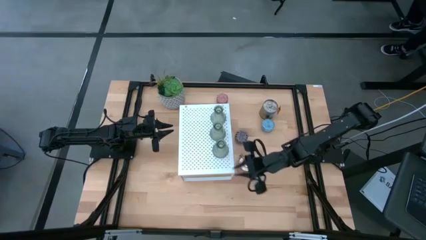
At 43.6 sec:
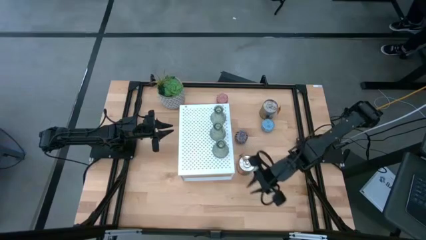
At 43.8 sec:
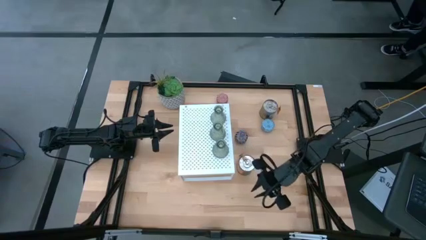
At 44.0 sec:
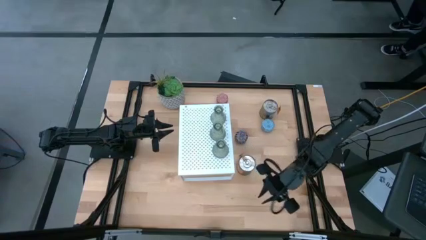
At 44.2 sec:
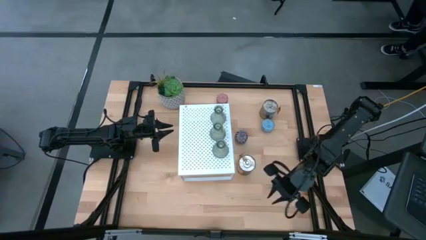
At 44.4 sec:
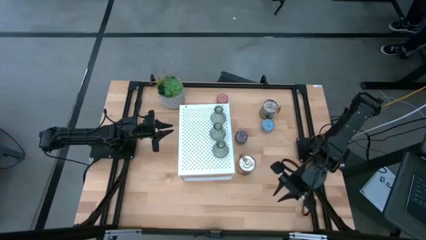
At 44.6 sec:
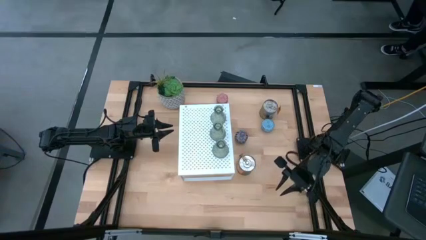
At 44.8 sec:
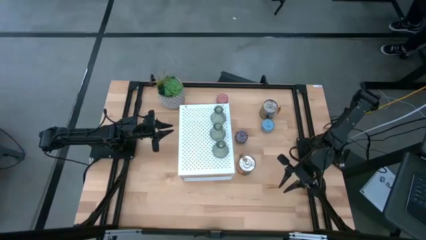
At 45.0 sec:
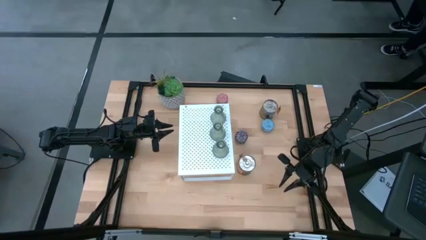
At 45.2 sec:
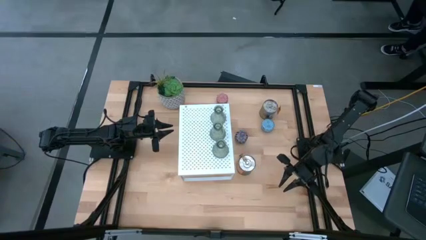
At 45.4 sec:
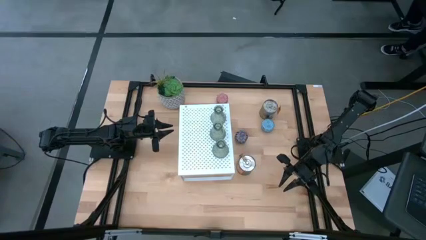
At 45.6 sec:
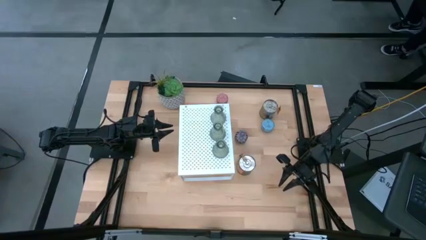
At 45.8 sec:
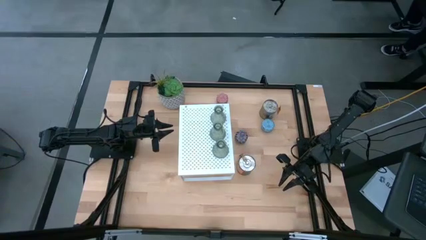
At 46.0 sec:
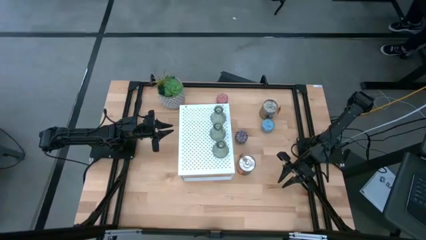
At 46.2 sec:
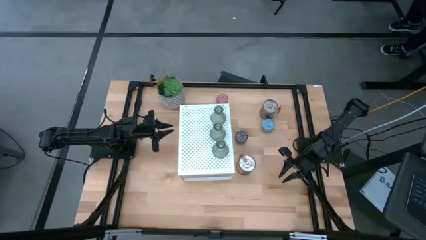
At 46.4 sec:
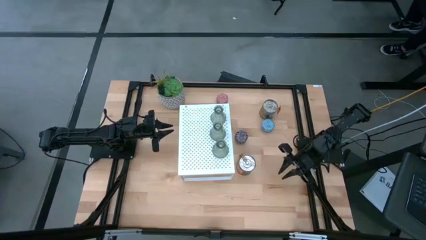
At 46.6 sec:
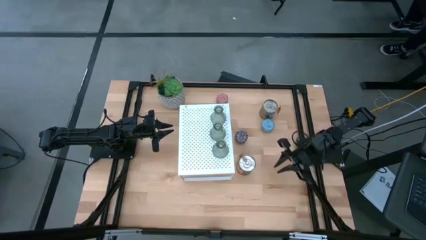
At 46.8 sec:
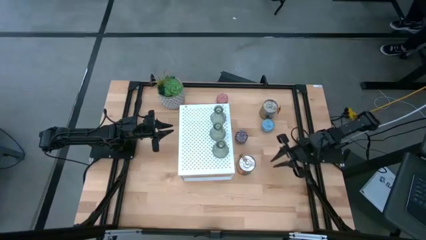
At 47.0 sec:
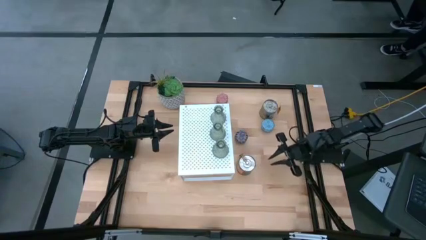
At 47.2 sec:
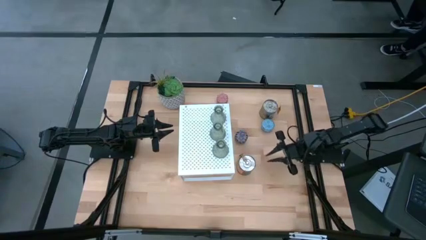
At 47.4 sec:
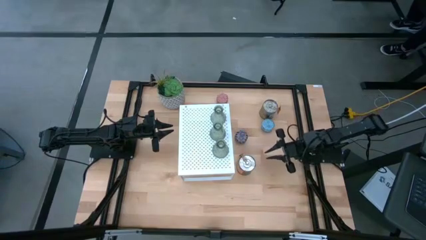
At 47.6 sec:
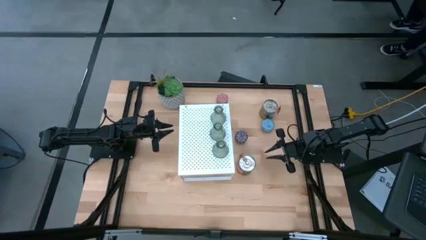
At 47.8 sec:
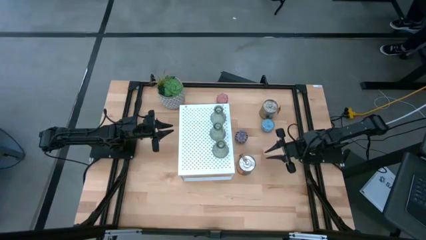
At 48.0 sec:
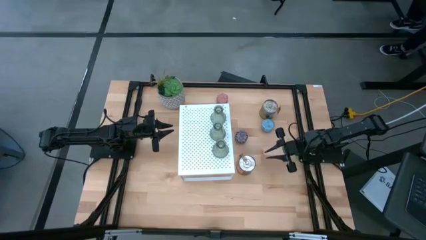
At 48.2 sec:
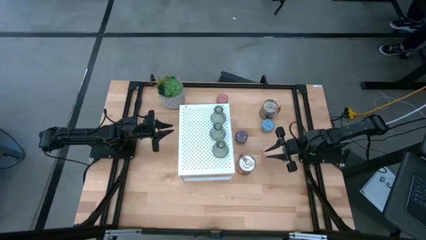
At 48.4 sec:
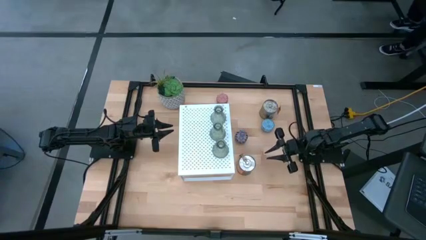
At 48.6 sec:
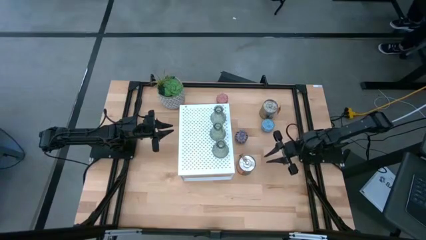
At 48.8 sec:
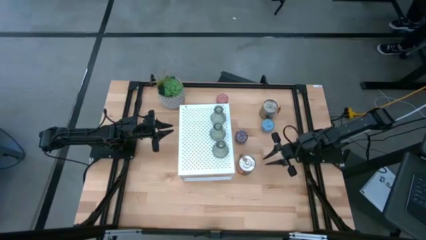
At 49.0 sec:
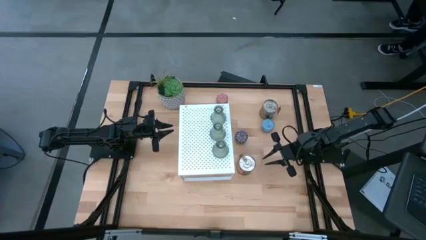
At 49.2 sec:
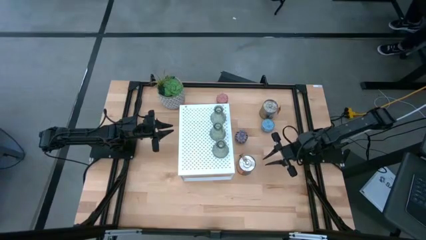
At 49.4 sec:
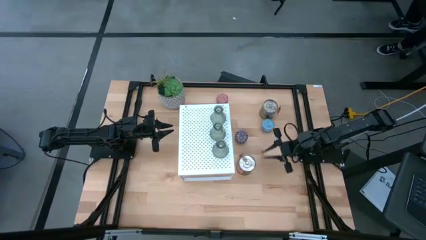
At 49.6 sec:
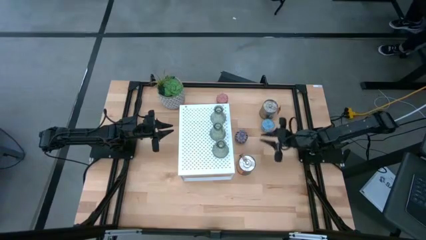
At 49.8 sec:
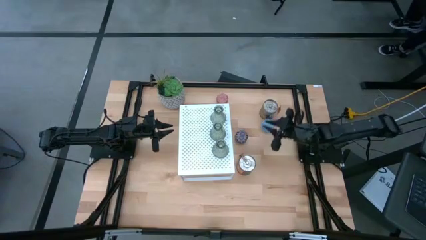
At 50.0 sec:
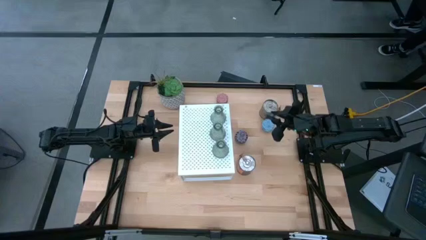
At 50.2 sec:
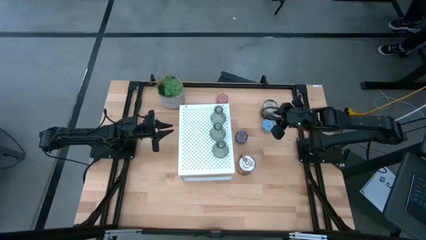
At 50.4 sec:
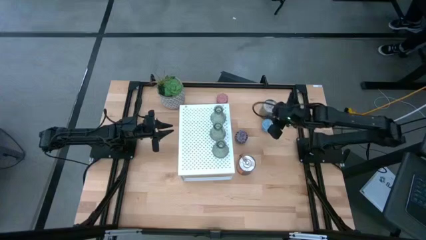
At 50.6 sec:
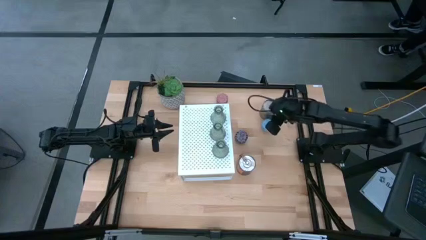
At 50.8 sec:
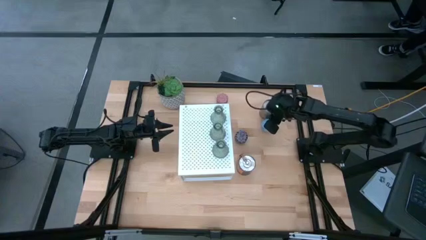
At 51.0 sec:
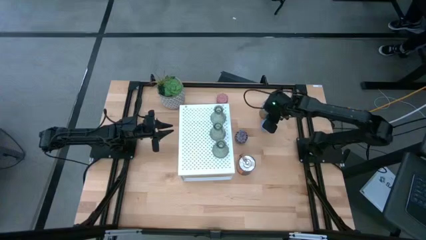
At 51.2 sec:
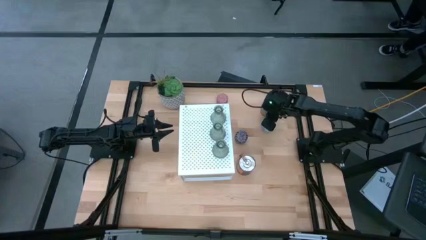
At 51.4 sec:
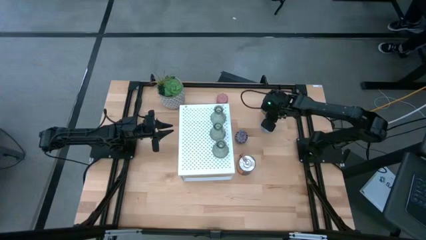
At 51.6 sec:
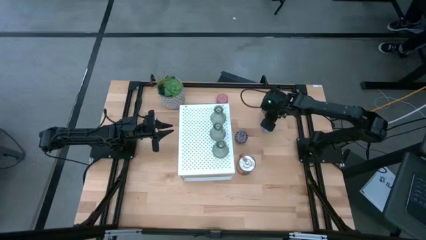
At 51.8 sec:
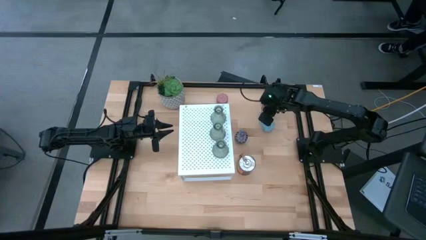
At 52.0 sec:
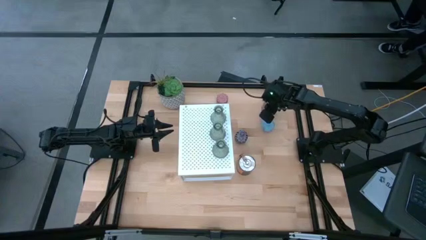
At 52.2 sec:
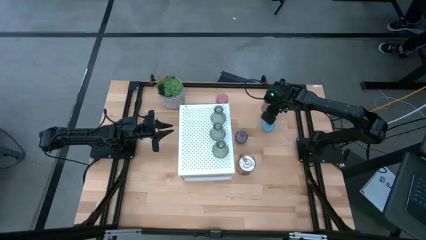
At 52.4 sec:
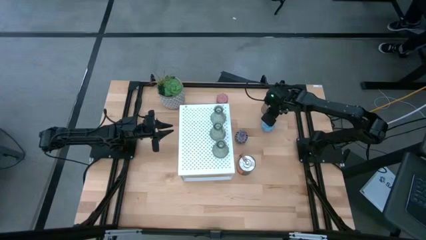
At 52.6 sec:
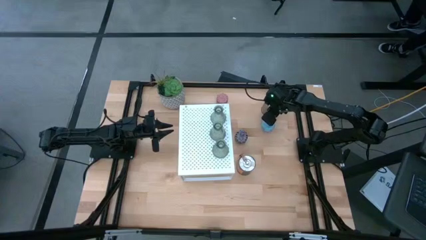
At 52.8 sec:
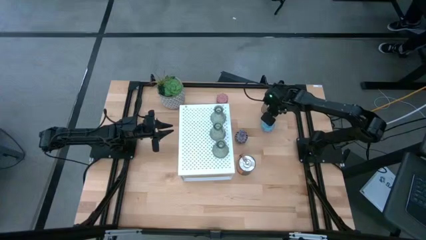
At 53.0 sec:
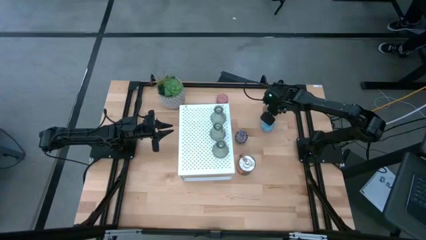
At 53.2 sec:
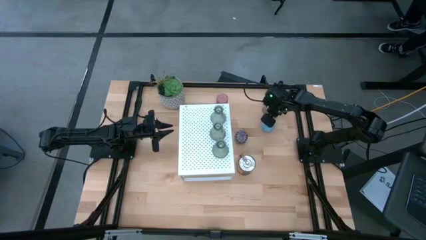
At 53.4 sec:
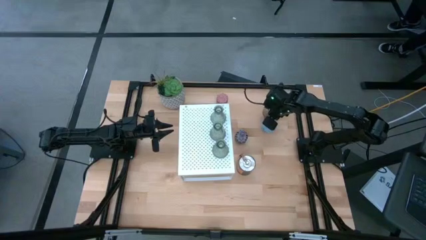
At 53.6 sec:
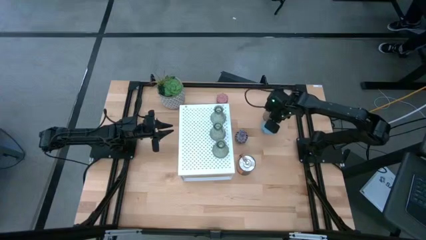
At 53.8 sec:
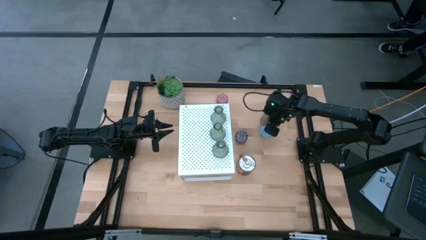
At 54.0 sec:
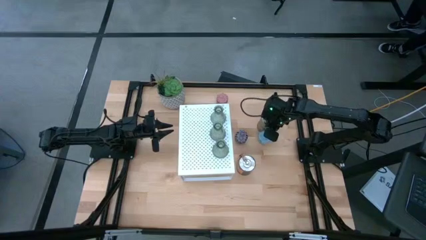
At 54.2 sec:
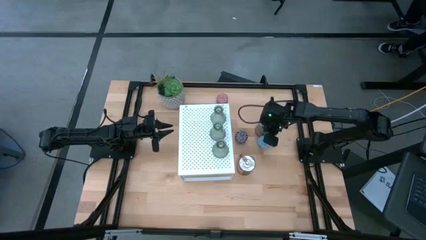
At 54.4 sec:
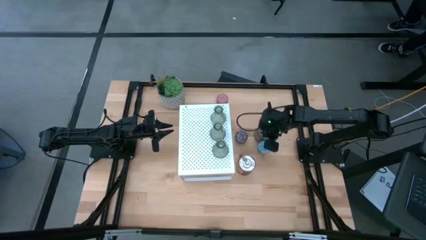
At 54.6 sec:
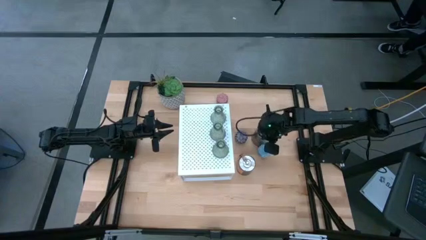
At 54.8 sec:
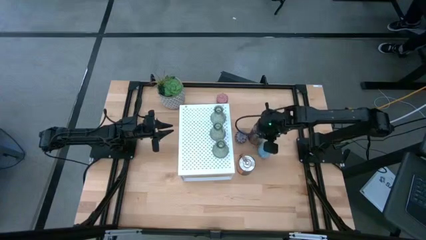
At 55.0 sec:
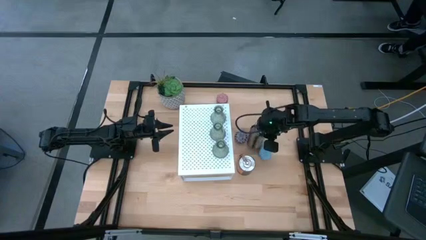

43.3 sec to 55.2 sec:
Task: Pick & Place candle stick holders
Put the top orange scented candle on the shelf

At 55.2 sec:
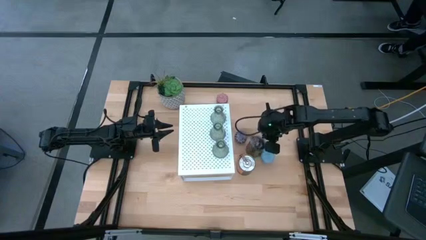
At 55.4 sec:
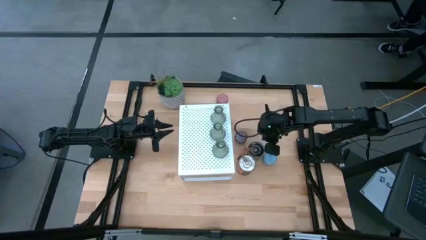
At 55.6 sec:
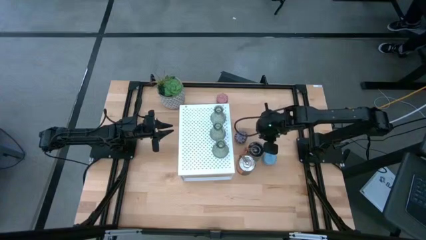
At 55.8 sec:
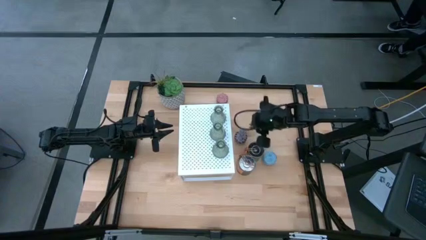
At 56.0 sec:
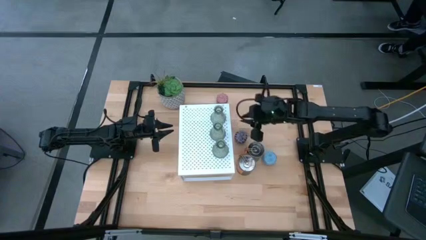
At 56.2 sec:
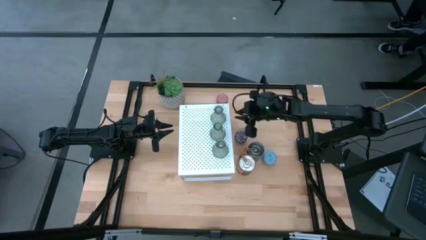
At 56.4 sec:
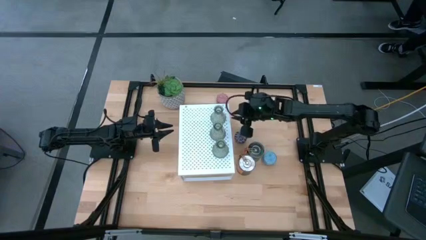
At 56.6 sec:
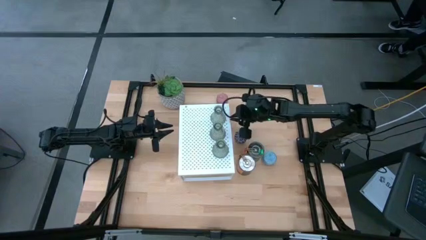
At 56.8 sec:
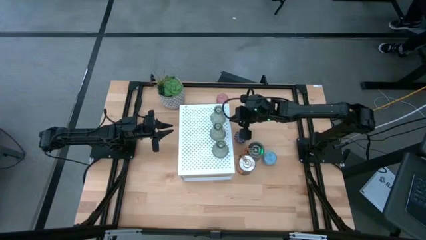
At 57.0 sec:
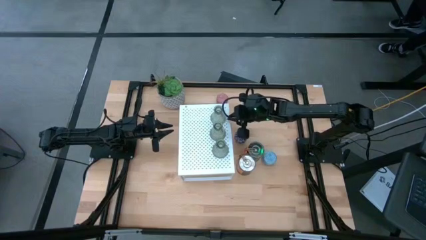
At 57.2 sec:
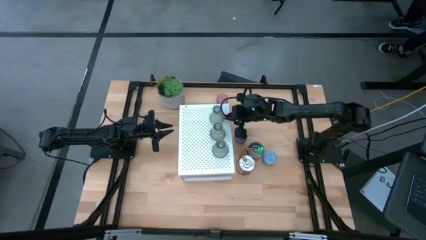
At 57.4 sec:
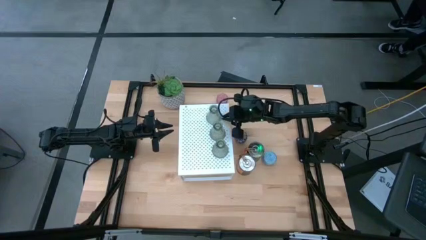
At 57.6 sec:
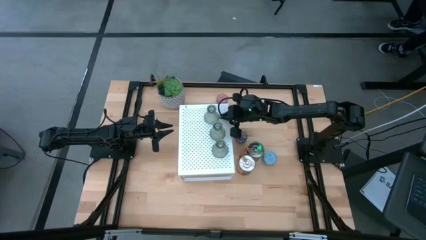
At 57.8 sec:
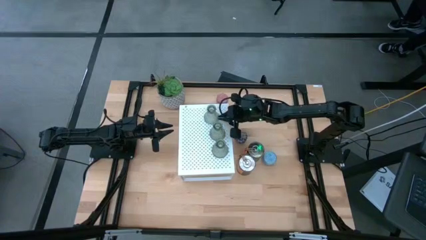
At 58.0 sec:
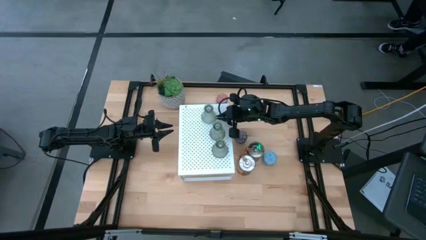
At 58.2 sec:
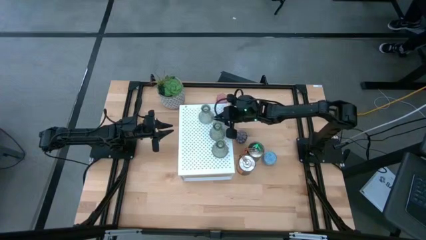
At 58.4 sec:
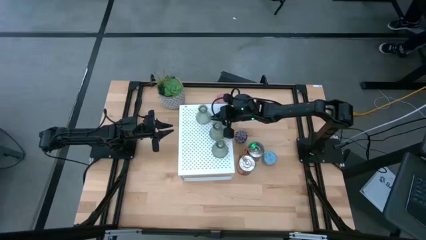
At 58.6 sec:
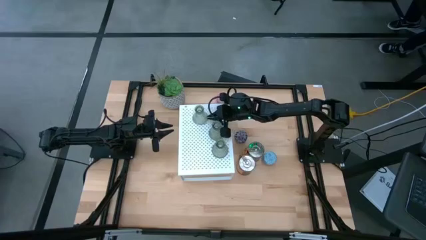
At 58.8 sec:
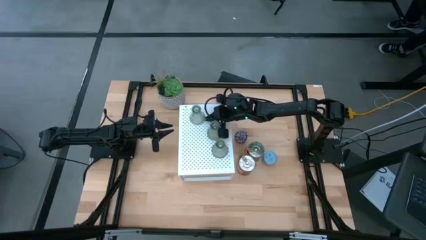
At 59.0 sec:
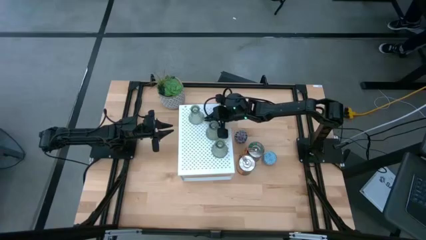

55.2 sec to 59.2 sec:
Adjust the green glass candle holder on the shelf

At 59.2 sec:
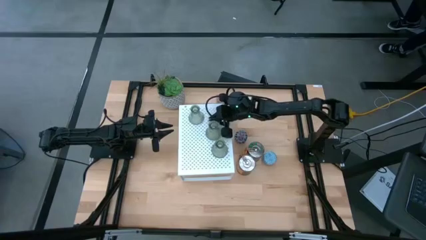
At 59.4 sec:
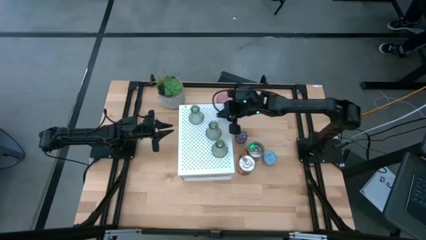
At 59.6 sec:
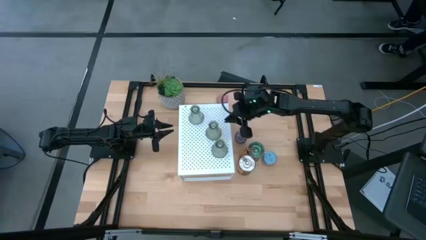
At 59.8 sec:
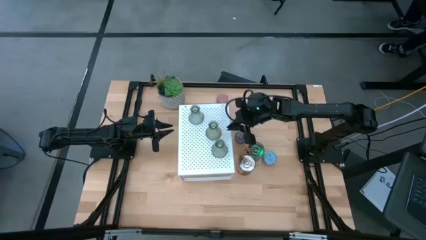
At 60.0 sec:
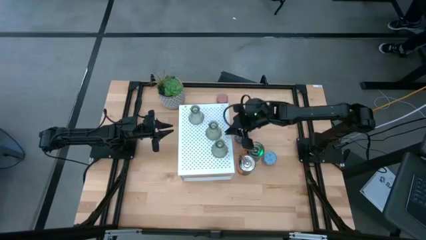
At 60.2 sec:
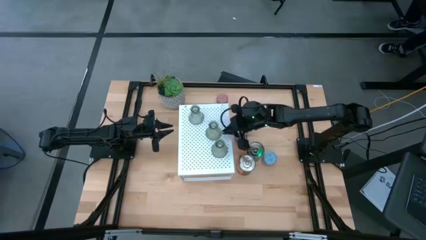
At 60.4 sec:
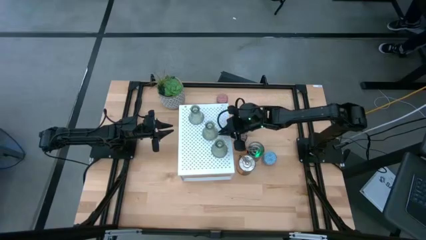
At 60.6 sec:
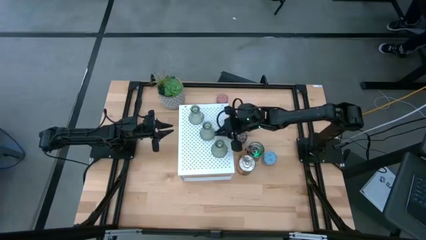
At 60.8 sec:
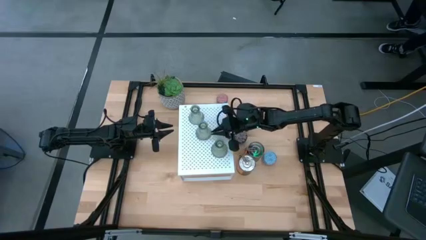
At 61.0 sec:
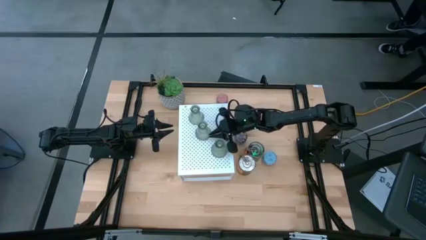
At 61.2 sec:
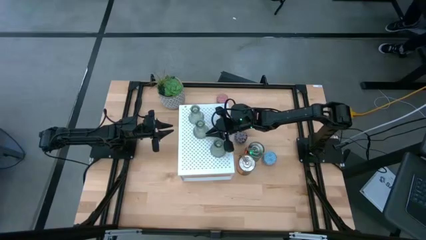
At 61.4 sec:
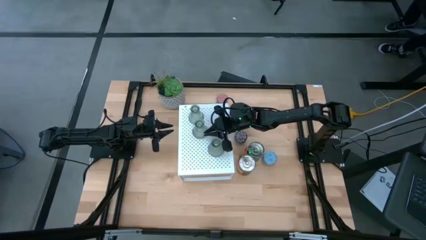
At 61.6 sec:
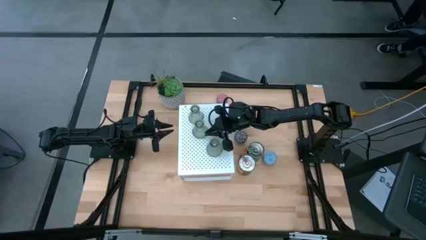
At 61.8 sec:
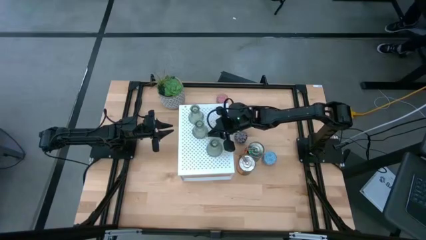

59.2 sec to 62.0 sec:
Adjust the green glass candle holder on the shelf
